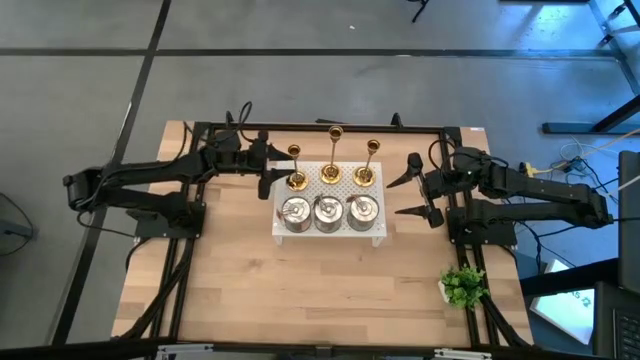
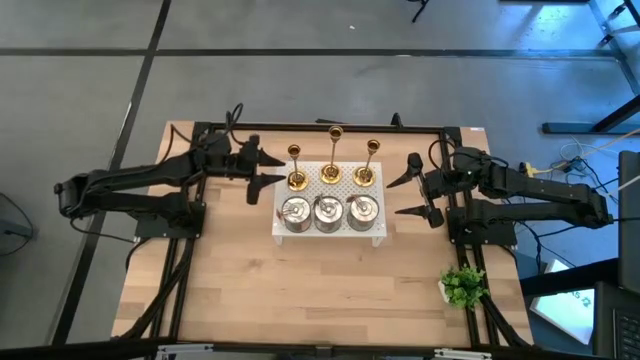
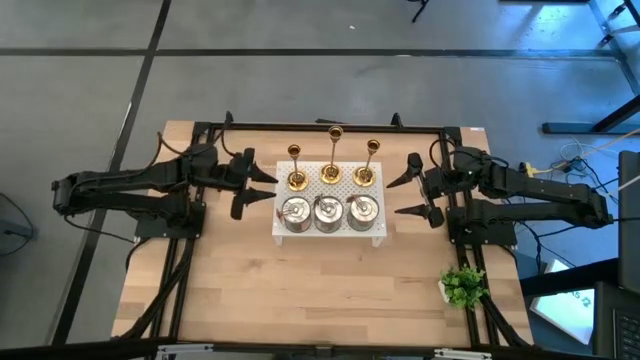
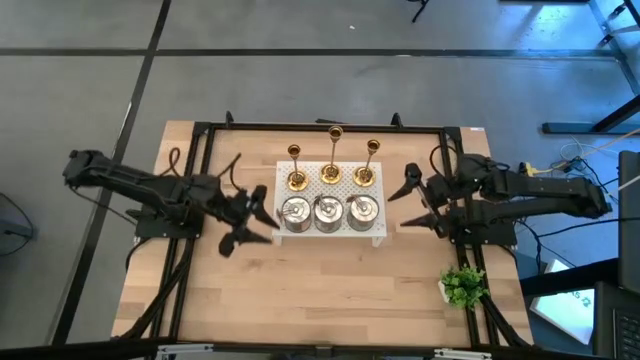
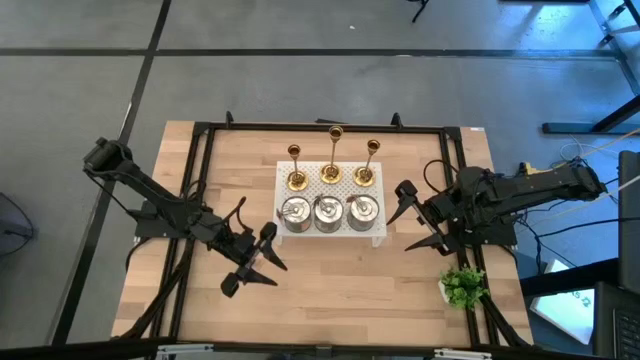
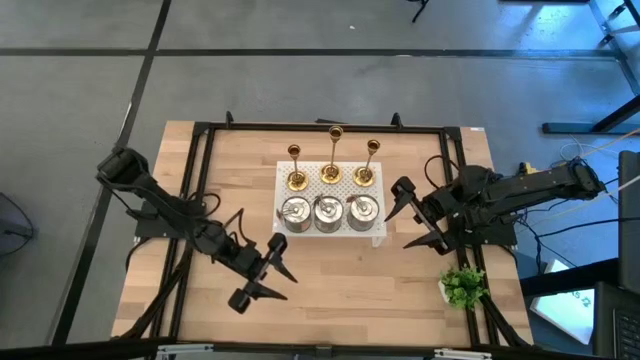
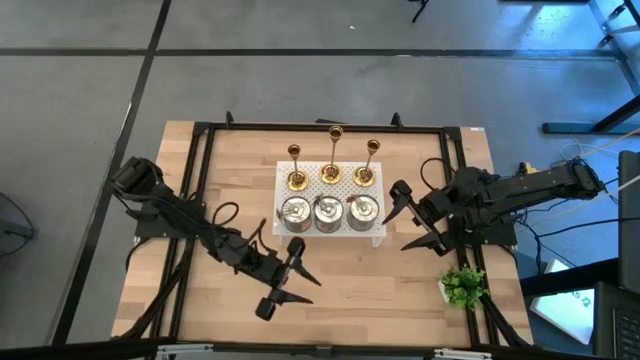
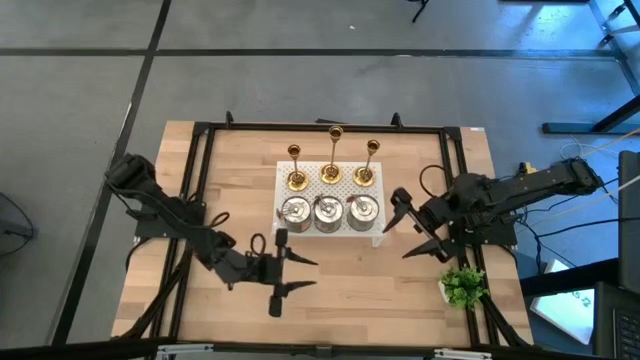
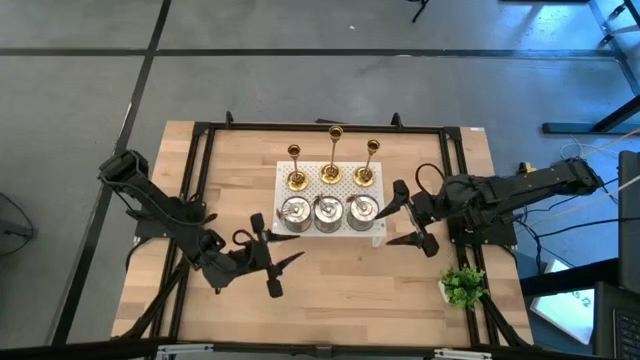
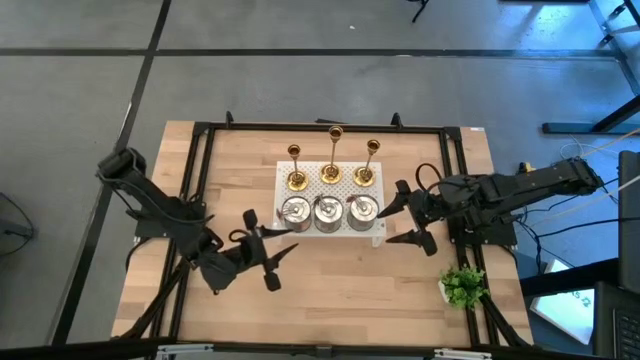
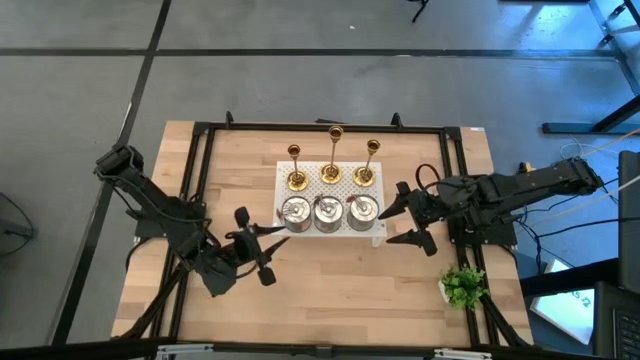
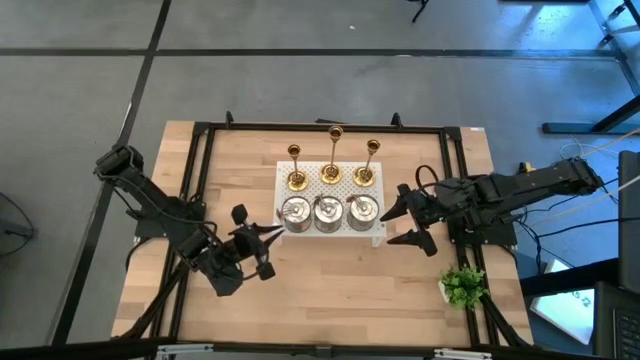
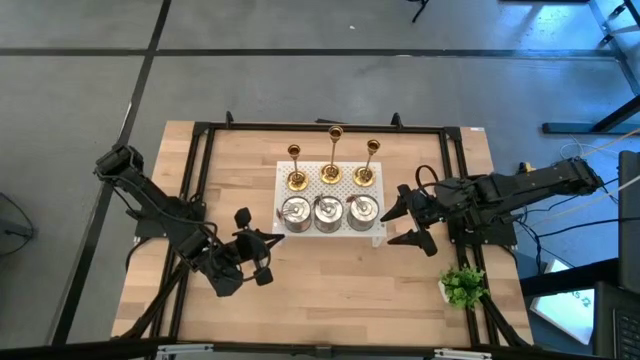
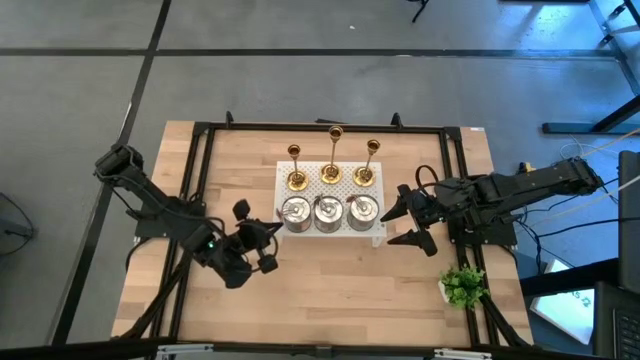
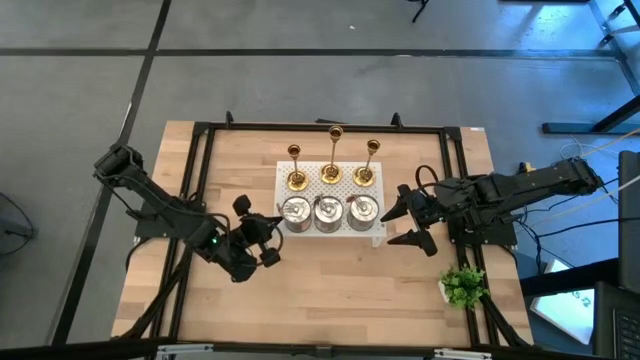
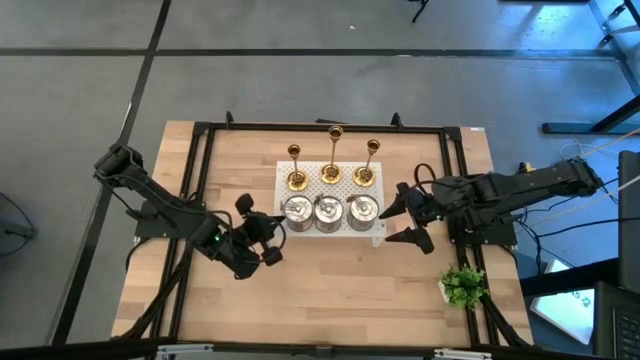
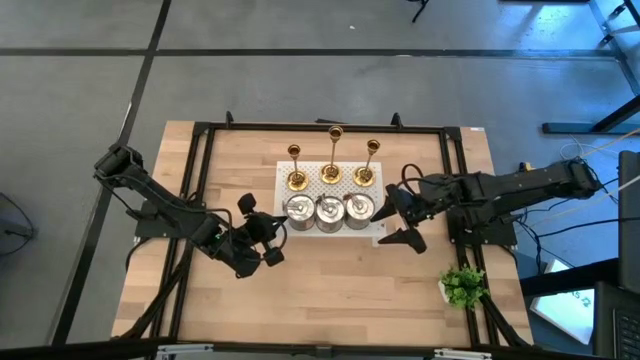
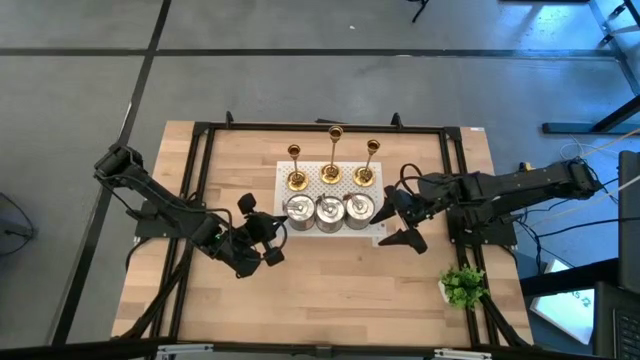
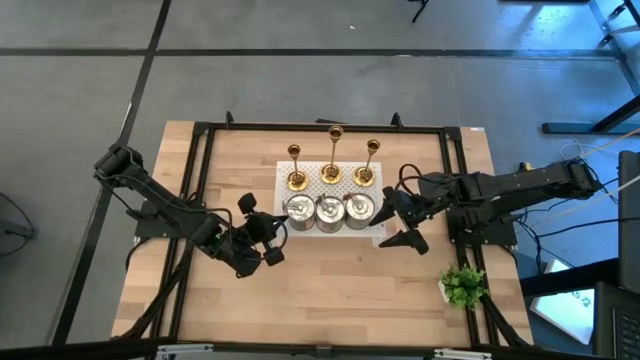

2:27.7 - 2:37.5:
Task: Pick & Place candle stick holders
Adjust the silver scented candles on the shelf

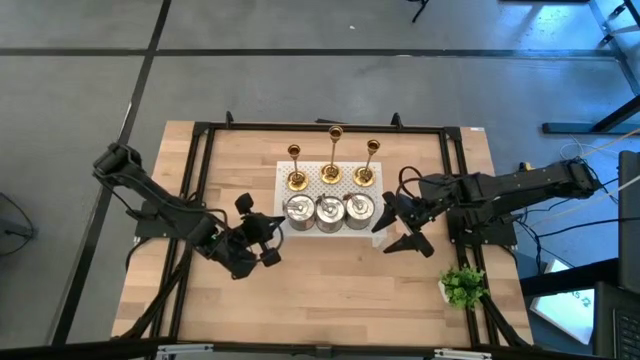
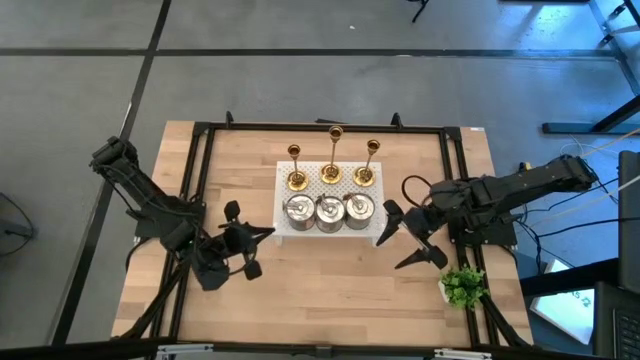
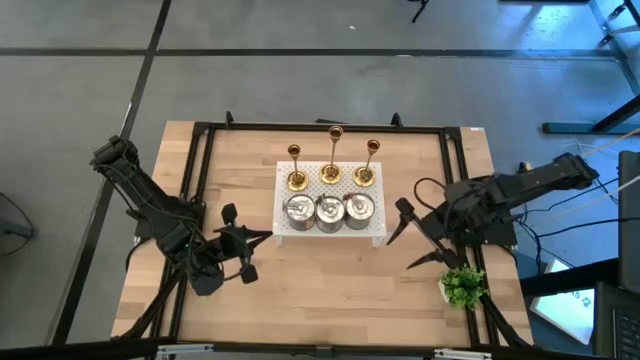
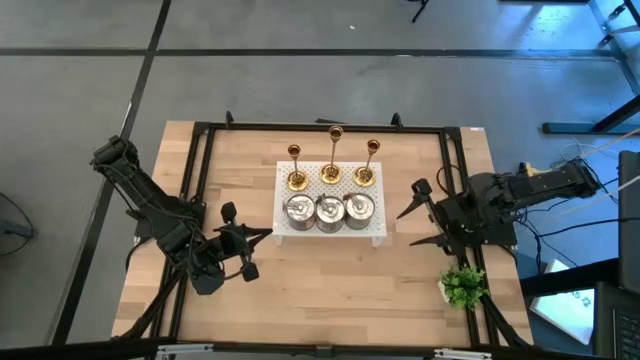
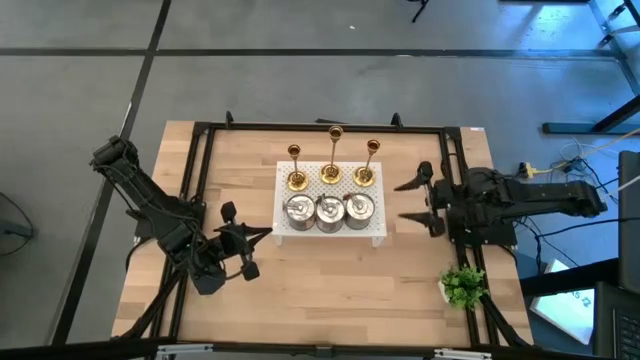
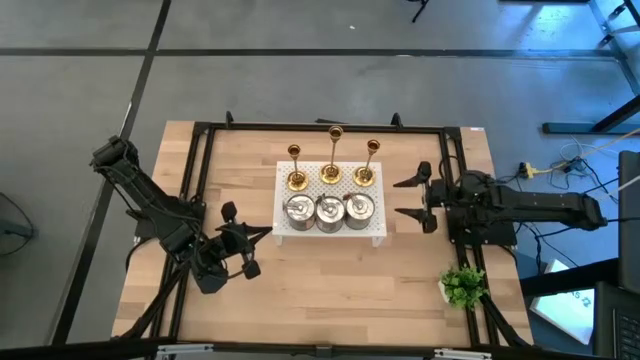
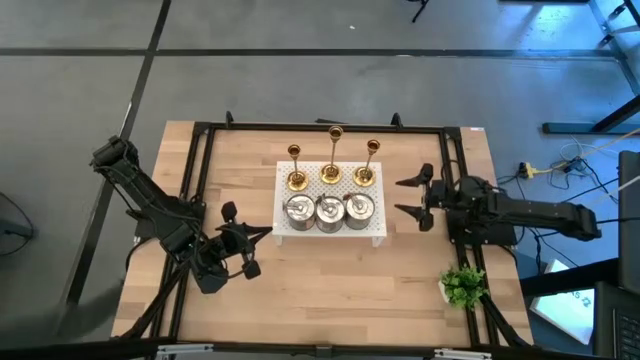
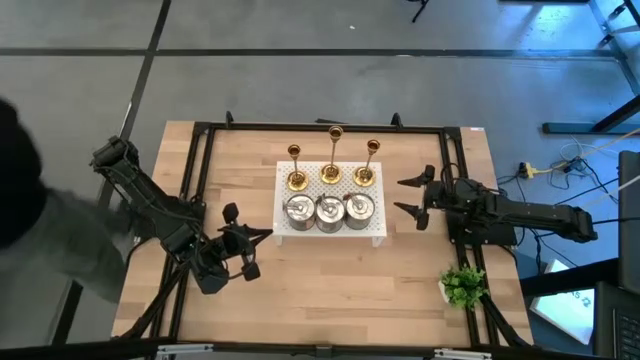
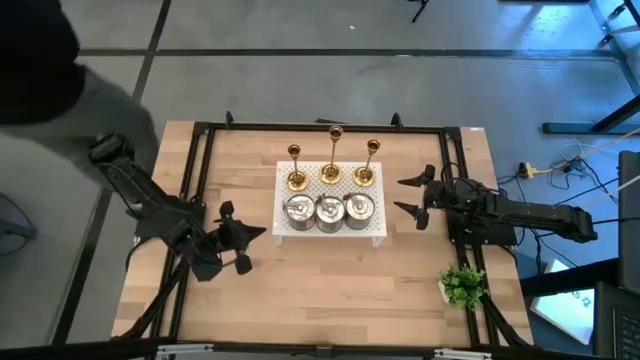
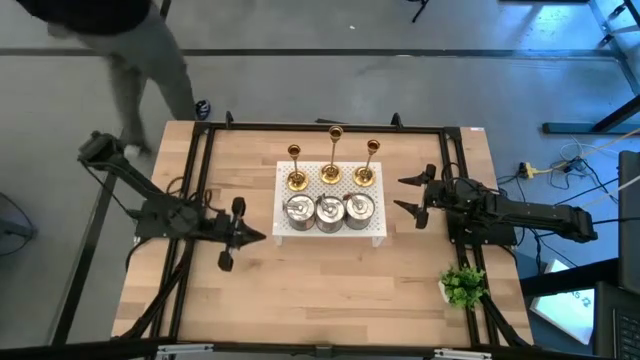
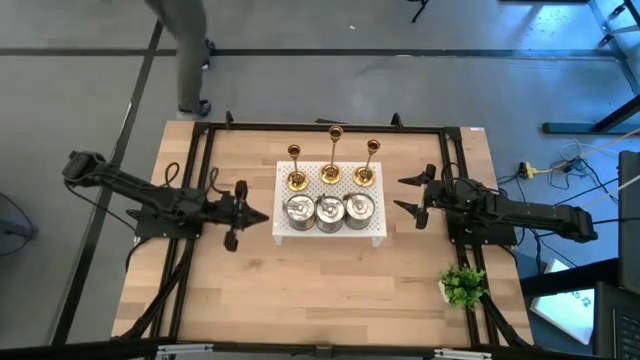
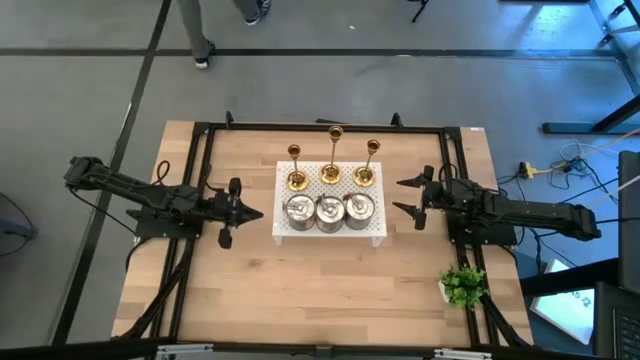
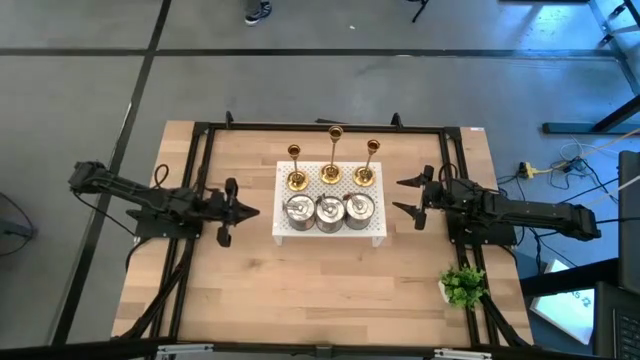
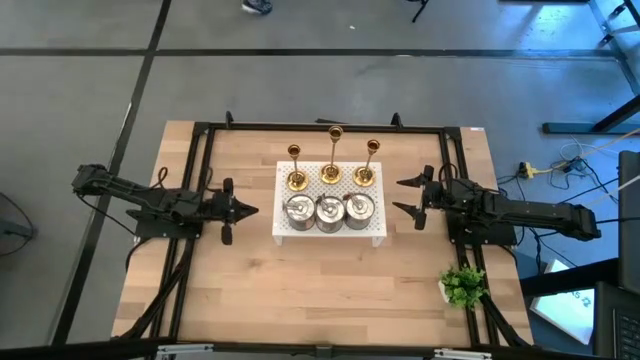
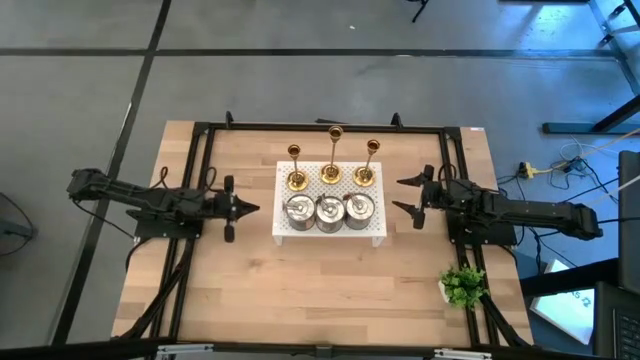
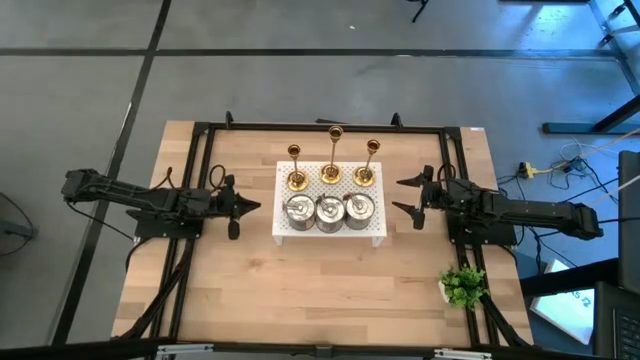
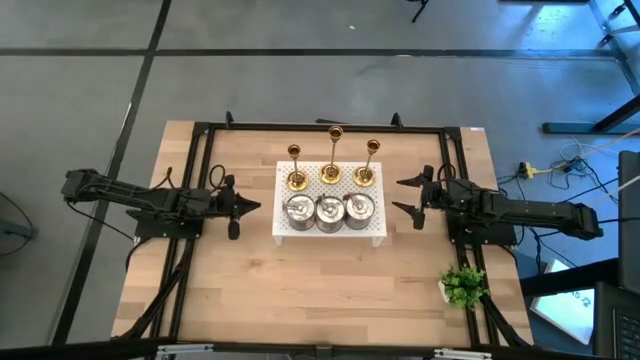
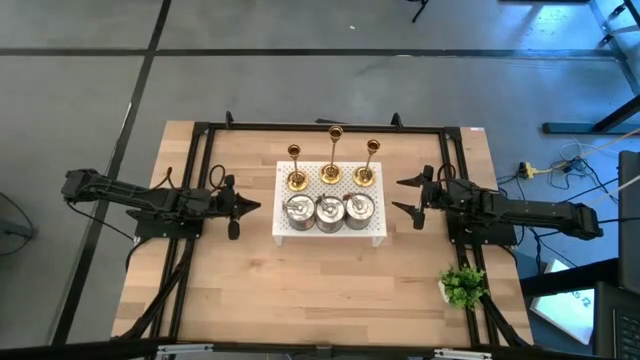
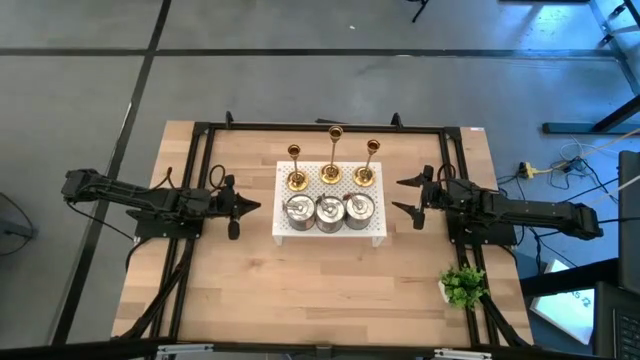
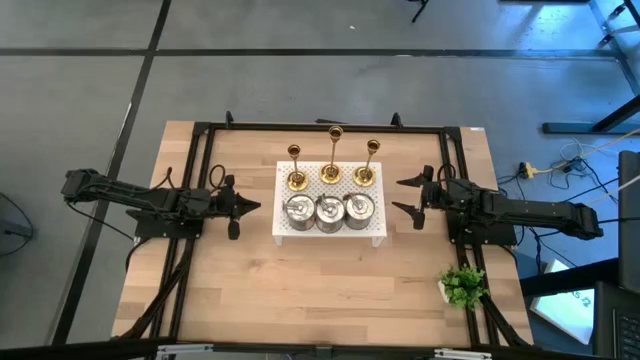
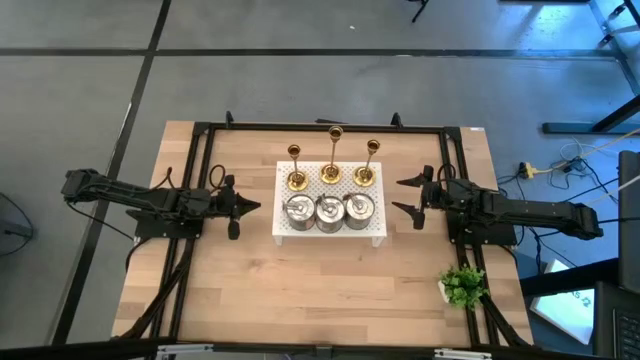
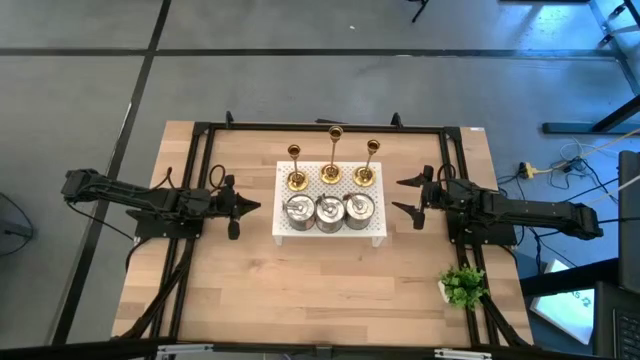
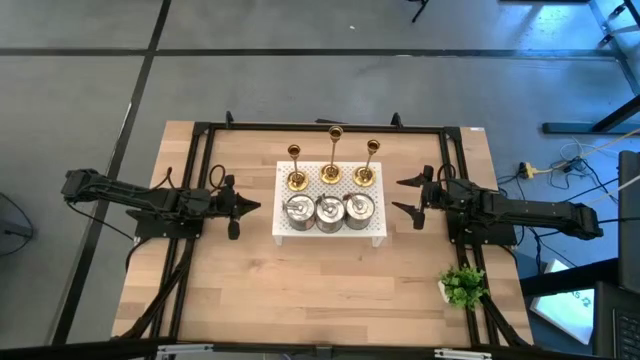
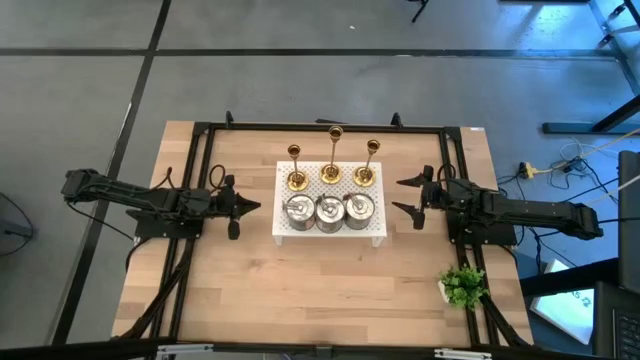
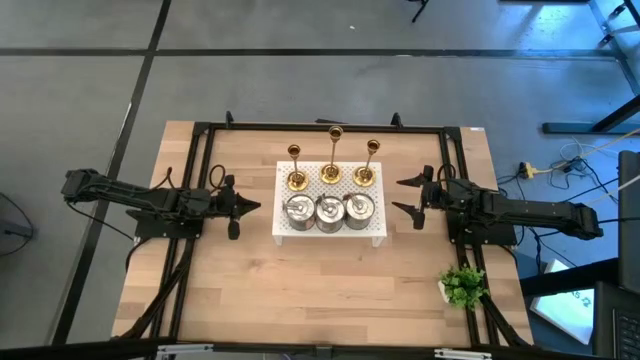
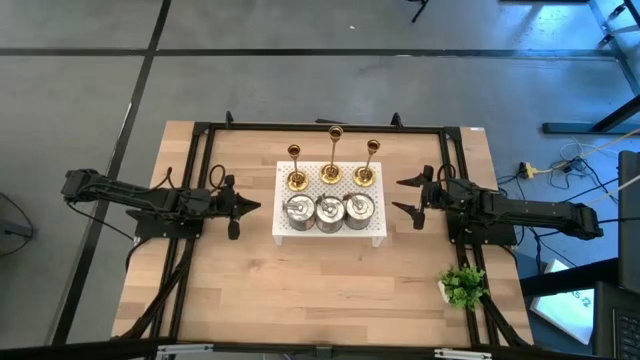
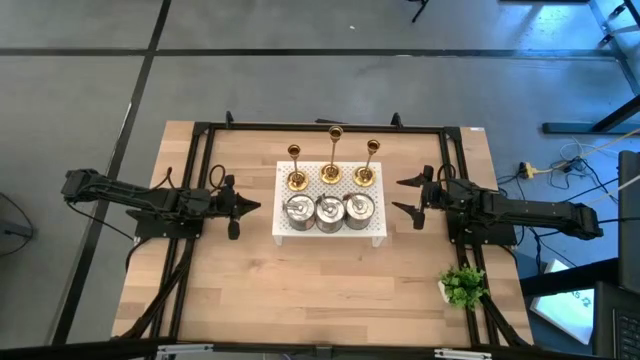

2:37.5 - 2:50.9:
Return to Home Position
